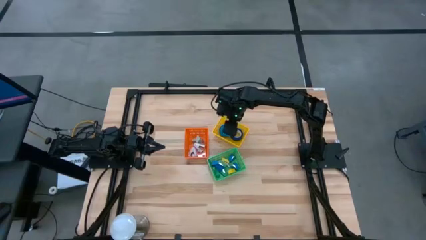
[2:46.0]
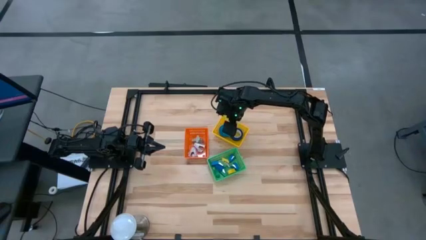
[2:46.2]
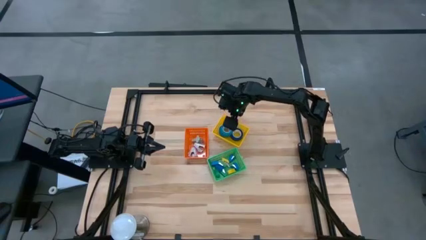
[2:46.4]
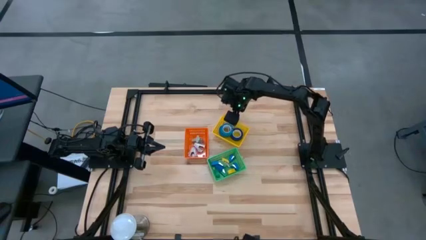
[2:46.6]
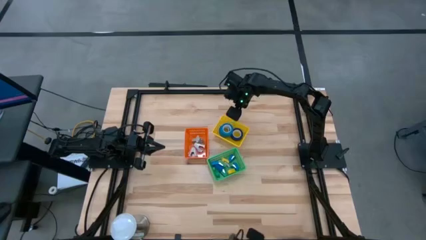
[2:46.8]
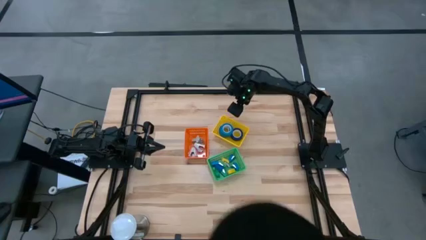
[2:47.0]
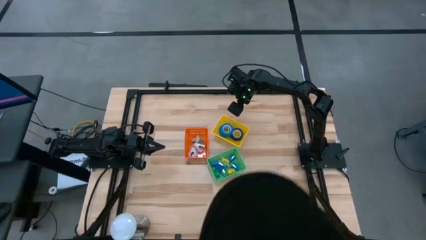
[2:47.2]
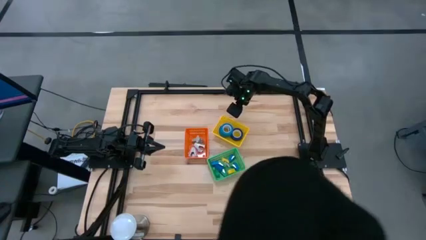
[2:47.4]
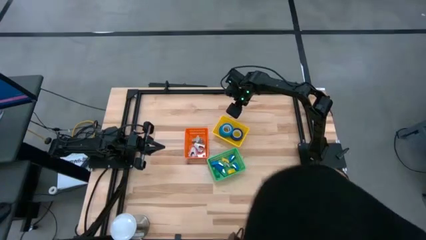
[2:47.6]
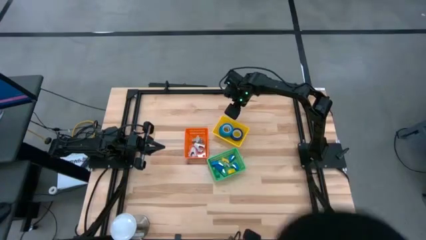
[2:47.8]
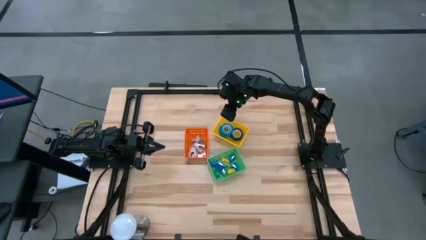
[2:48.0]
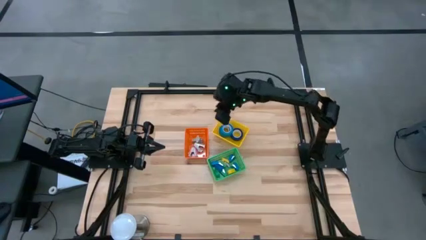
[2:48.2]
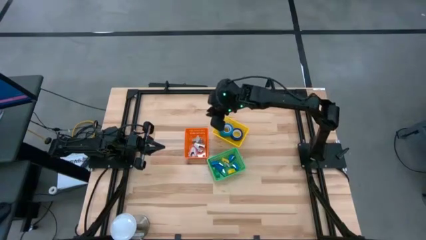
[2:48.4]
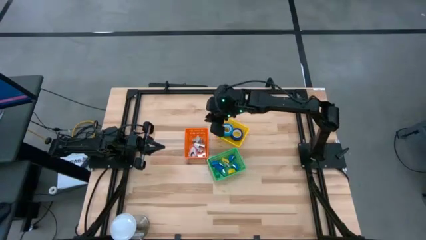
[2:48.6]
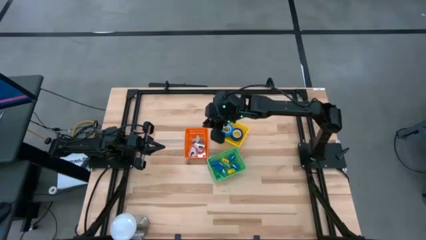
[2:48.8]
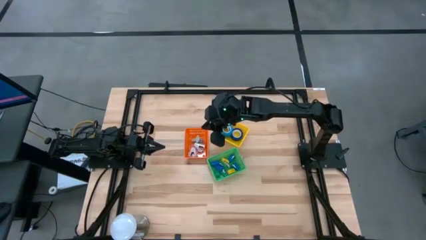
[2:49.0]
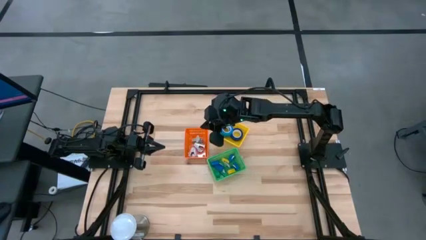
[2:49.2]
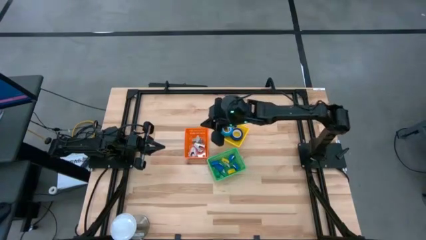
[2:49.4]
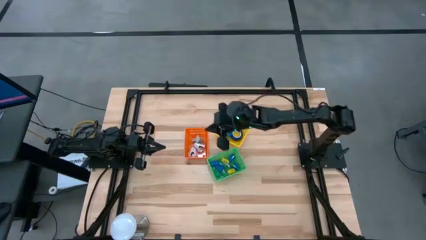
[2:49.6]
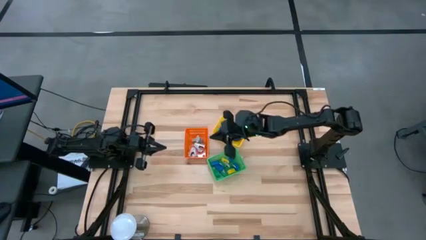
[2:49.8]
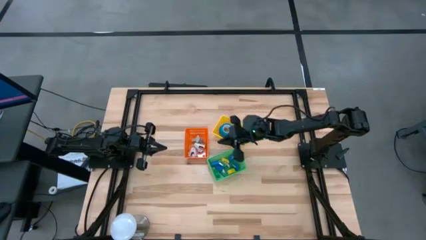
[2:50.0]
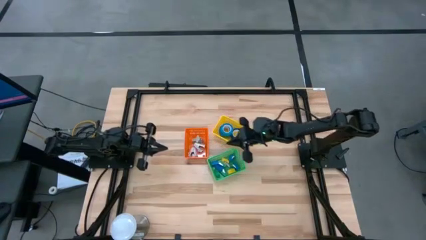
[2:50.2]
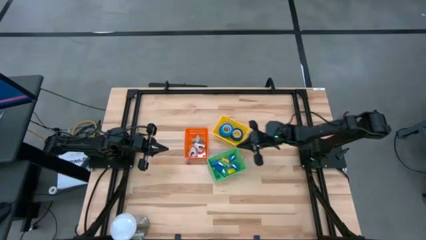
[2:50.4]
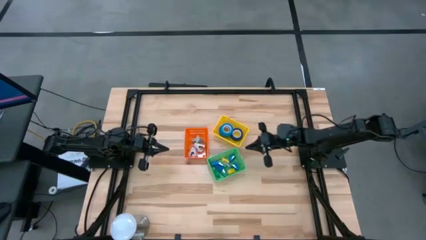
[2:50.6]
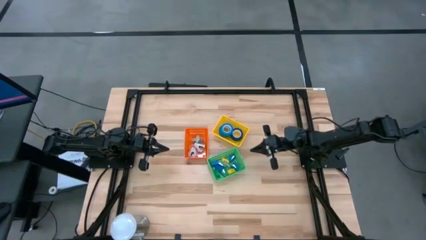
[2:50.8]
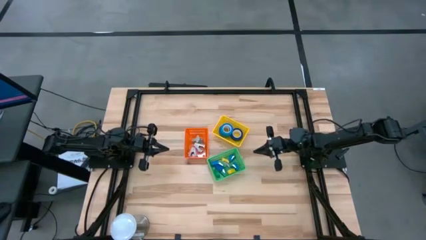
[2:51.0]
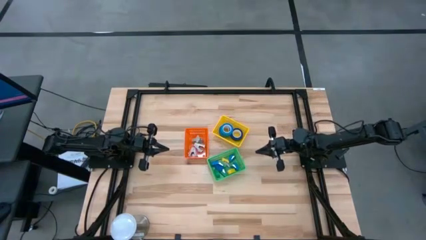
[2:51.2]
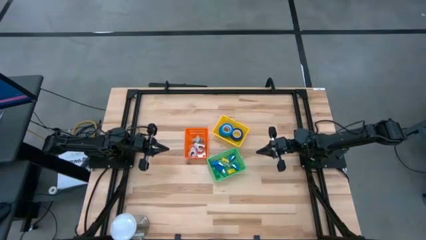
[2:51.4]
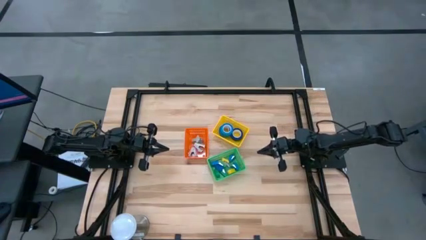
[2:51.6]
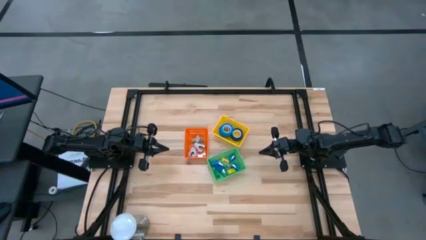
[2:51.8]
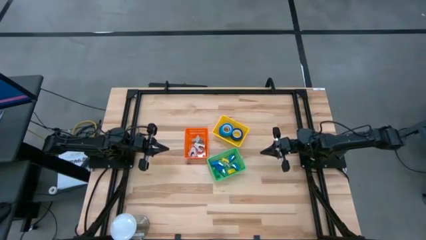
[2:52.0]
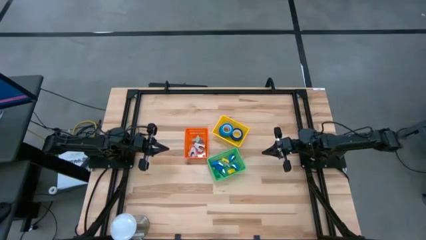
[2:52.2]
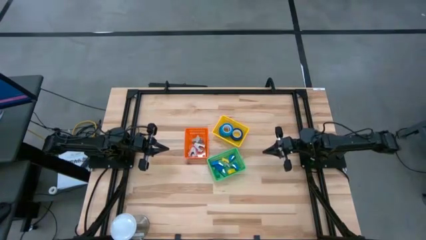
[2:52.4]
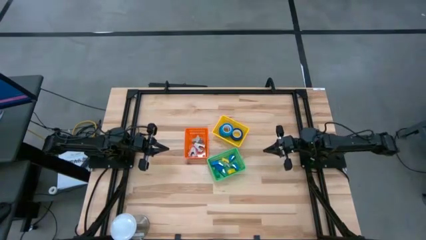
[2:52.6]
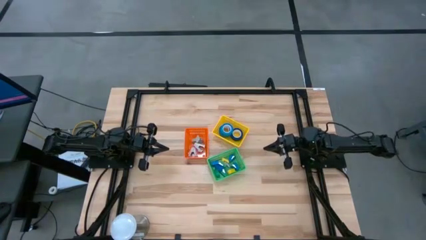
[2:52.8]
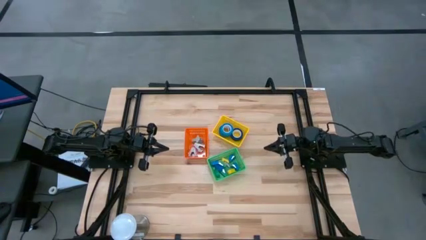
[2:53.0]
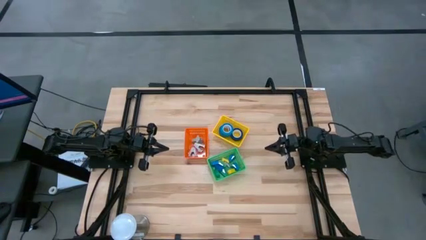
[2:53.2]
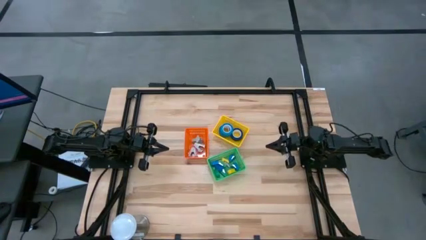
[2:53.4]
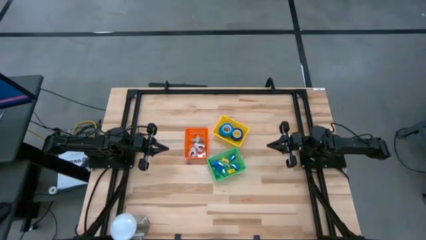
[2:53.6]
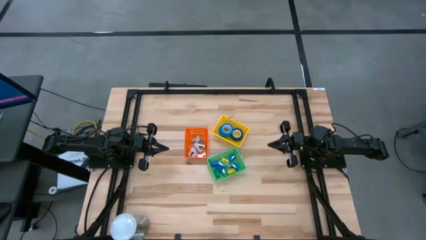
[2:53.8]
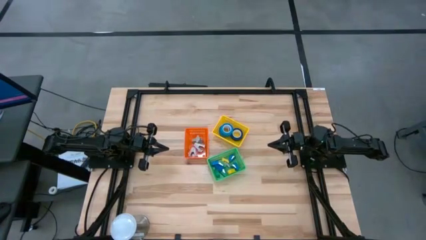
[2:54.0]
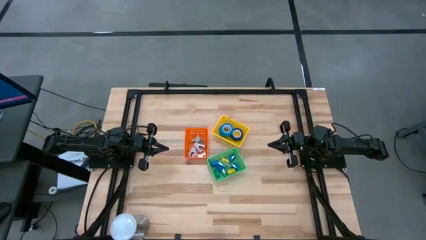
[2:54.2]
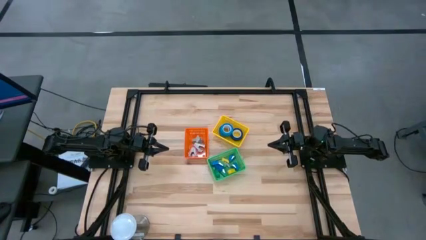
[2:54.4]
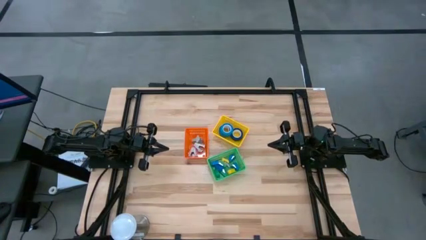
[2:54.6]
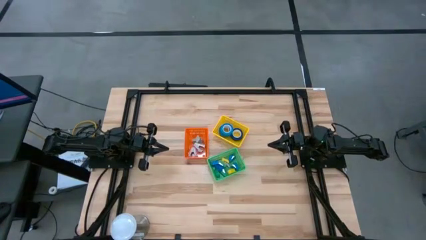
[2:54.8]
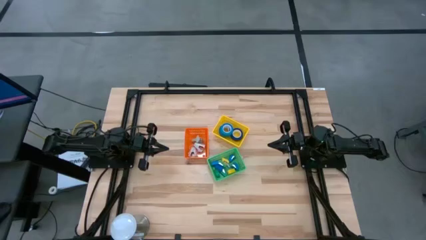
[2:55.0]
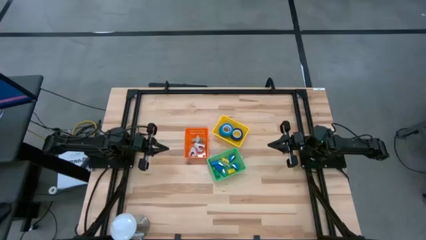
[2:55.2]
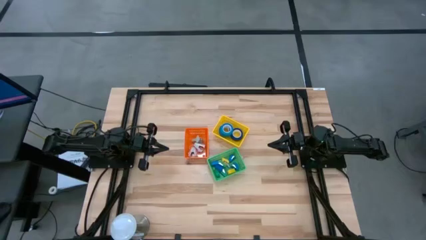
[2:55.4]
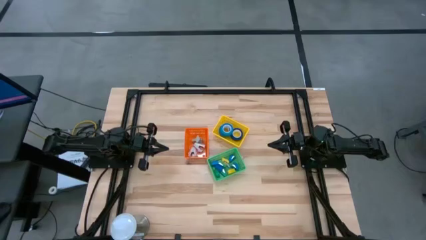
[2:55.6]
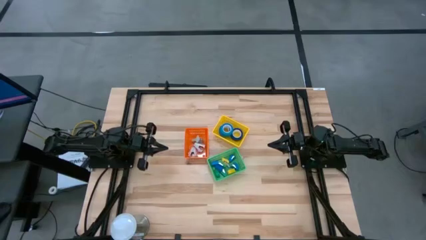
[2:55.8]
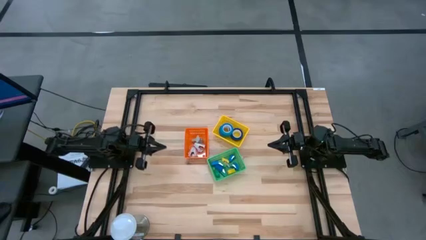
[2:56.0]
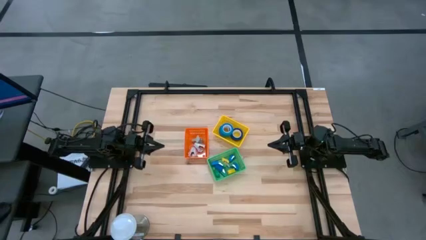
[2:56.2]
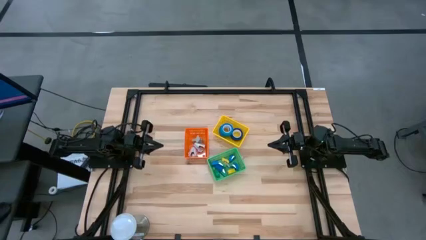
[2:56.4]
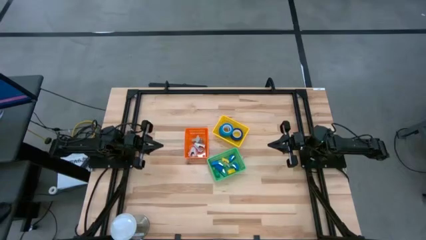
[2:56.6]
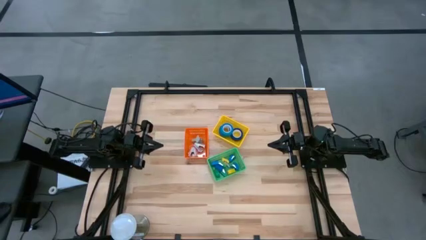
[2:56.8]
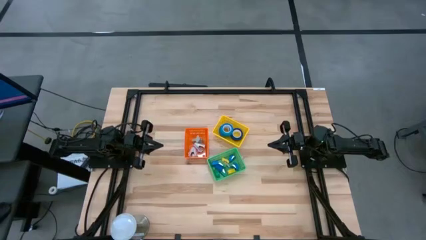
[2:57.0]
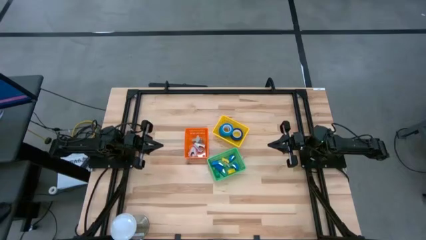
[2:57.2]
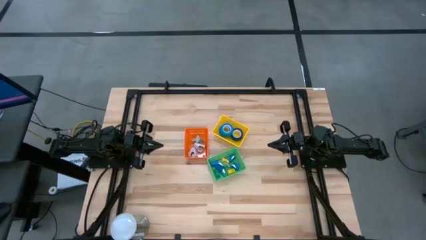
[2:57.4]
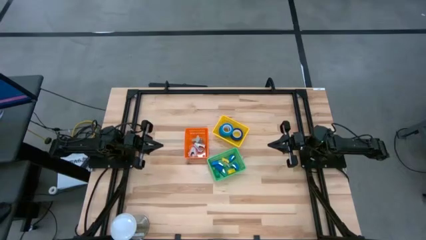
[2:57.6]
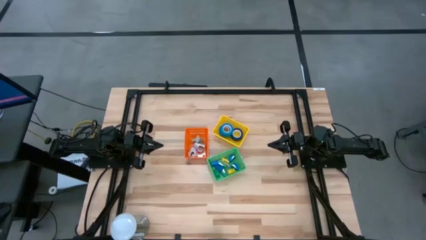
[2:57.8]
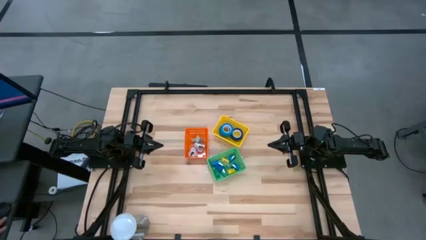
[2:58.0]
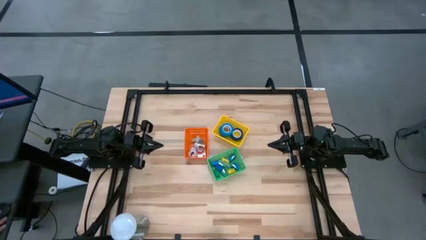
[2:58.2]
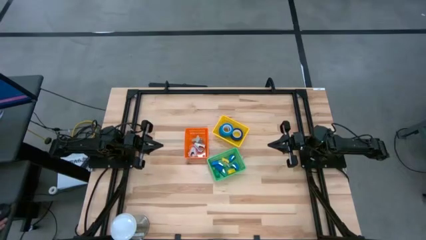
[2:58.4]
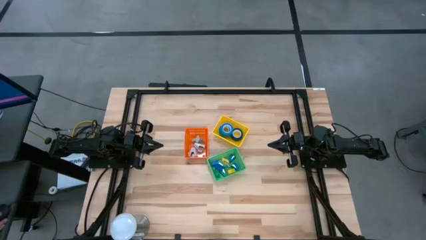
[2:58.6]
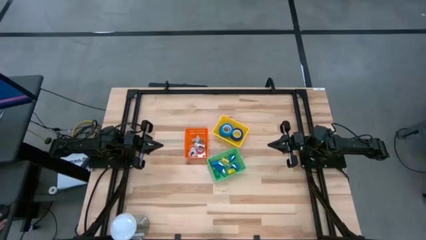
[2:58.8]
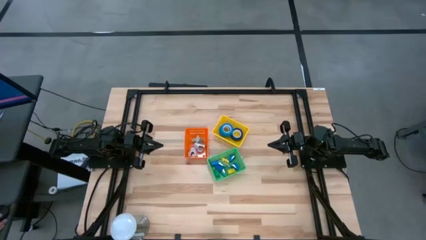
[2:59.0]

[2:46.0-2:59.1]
Task: Pick and place Stapler, Stapler remover, tape
Return to Home Position
